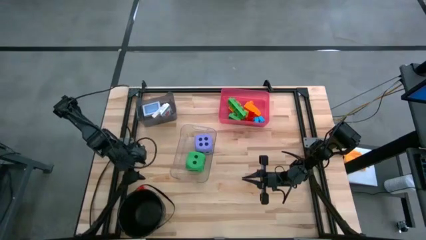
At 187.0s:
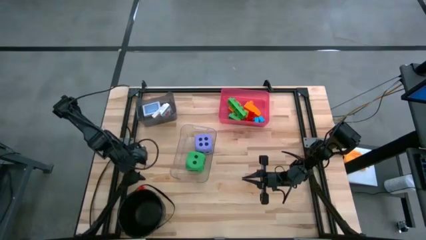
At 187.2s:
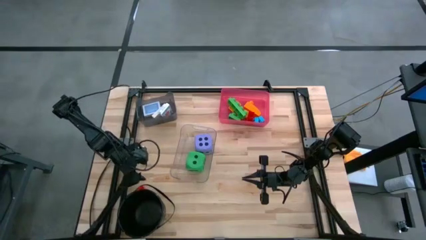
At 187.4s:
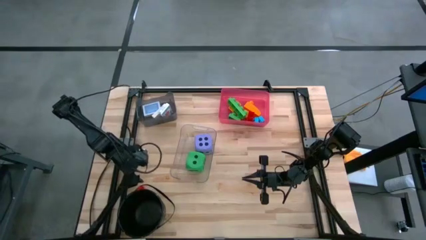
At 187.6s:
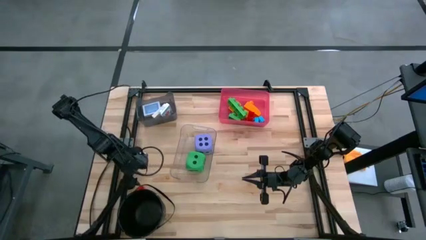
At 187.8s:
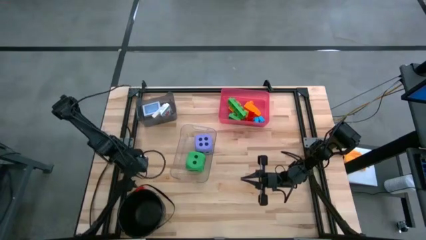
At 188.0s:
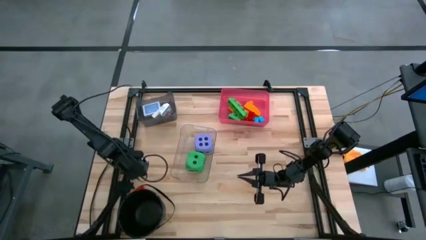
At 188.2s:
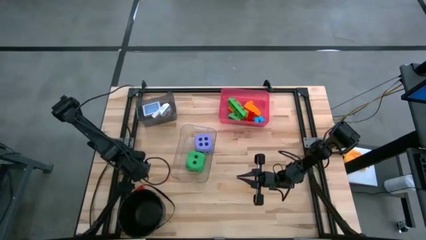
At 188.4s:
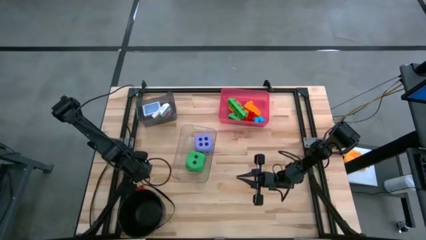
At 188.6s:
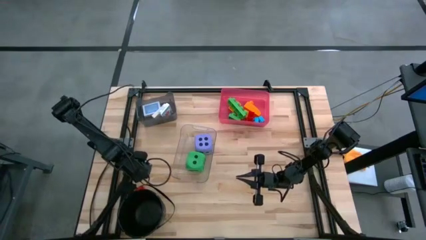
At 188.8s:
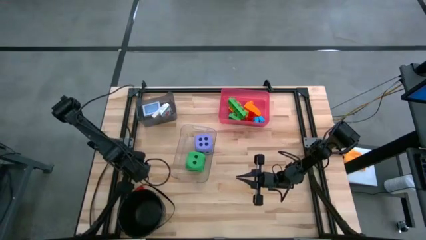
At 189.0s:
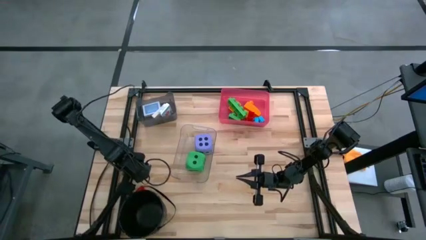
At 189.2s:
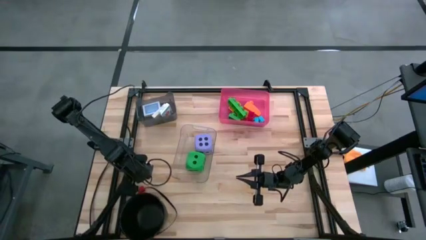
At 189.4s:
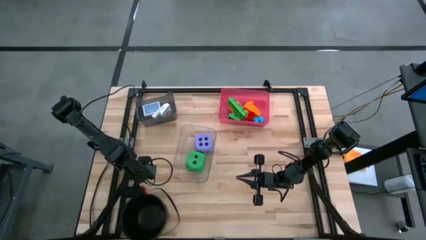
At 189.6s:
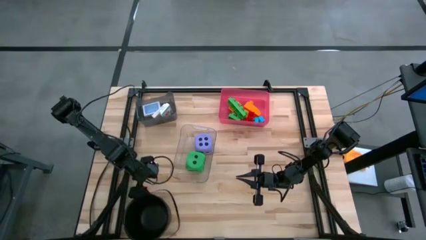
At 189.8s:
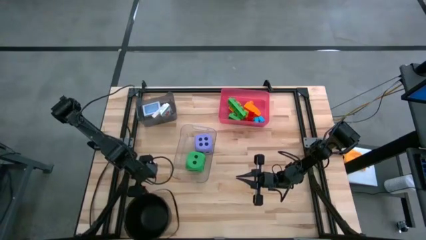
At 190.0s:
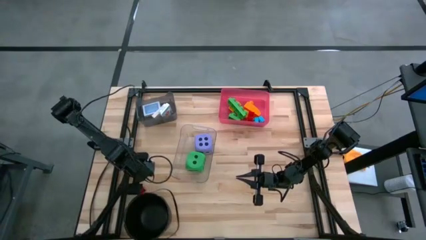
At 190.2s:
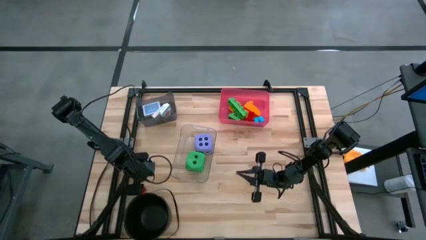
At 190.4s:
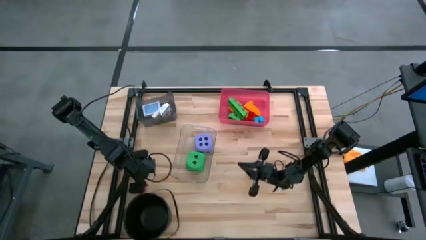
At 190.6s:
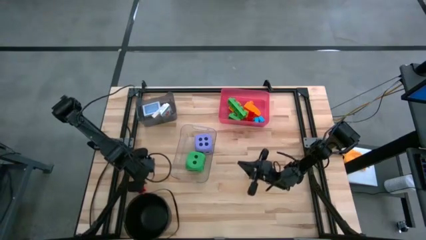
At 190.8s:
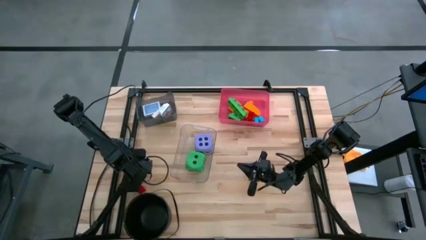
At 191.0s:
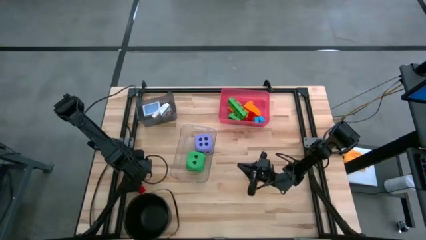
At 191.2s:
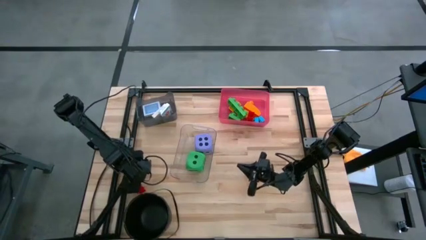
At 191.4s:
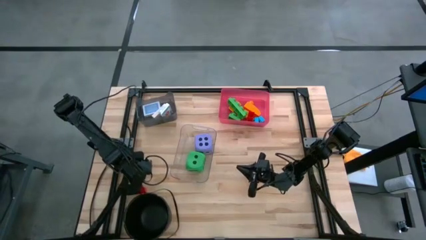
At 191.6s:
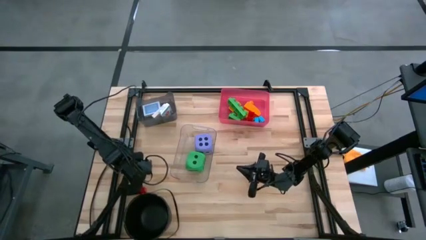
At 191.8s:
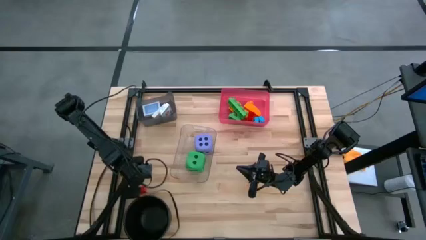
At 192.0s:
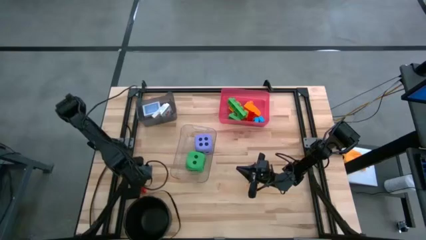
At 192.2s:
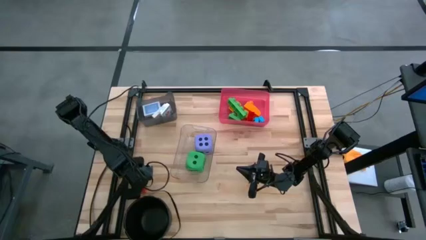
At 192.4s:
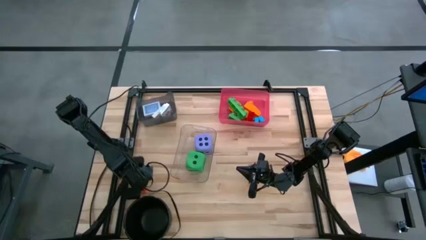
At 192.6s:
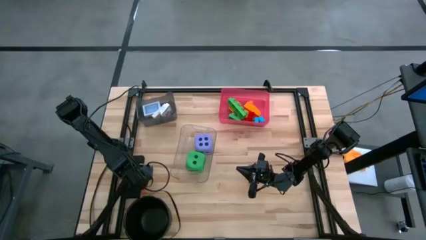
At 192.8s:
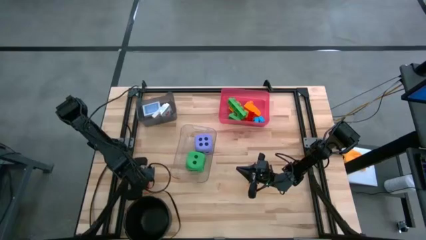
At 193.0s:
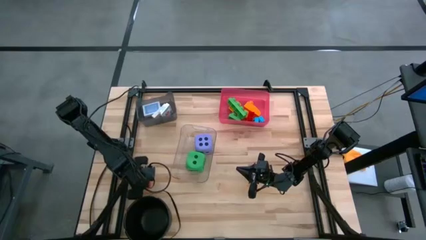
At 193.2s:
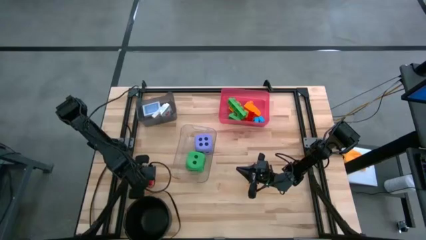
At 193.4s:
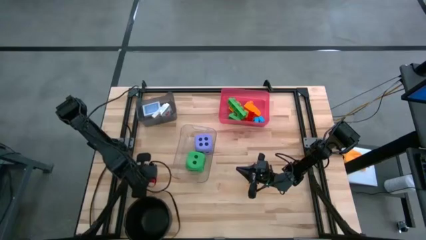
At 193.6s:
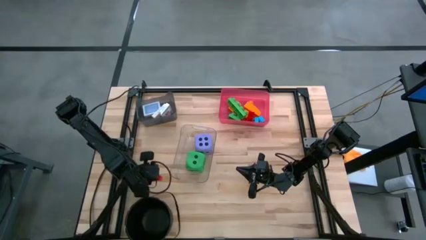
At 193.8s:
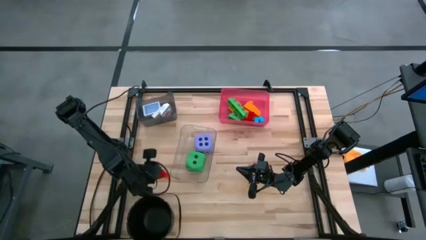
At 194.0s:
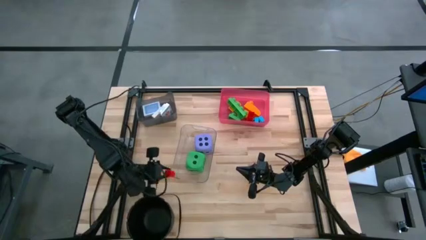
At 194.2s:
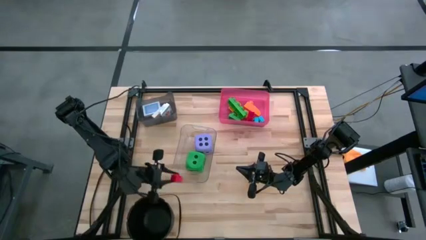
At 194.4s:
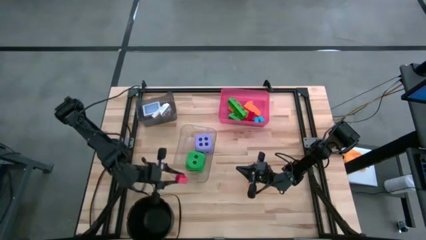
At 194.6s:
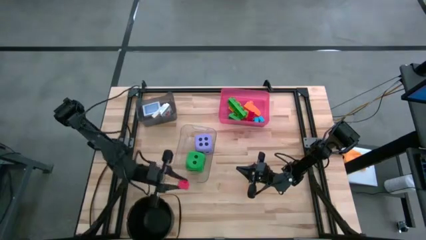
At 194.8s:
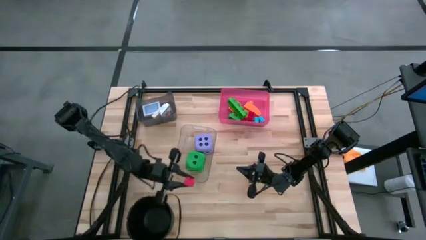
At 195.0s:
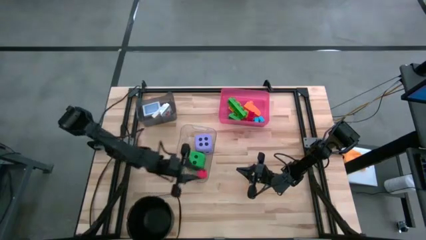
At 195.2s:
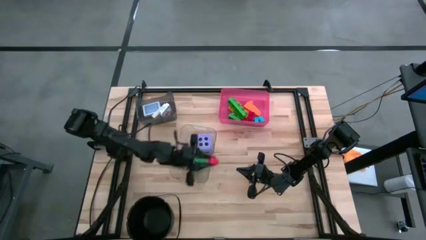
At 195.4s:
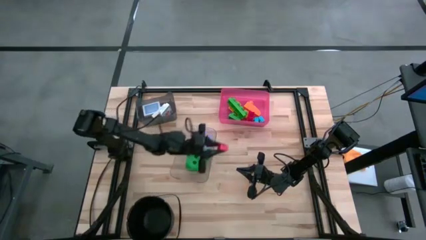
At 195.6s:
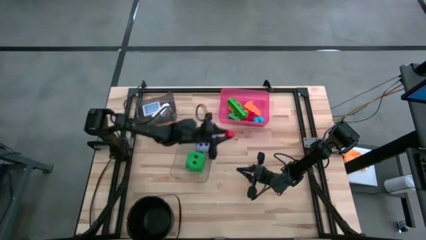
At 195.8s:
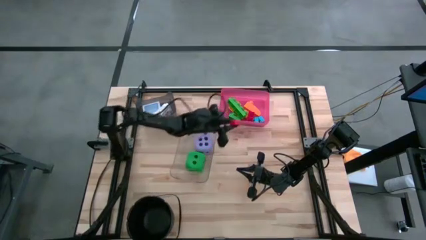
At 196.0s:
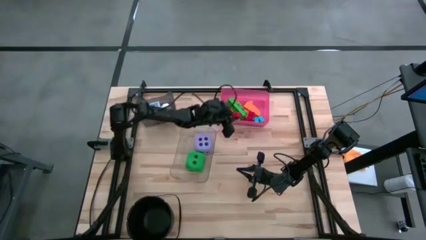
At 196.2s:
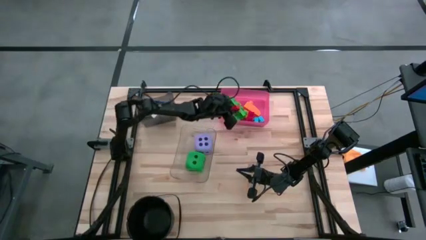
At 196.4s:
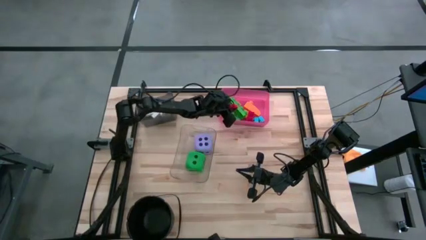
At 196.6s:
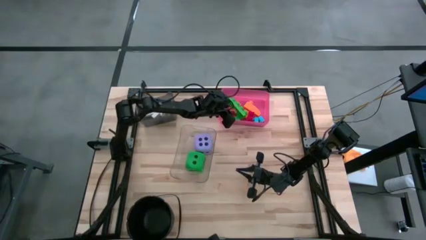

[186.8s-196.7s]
Task: Pick & Place Toys
Put the red game piece into the pink bin

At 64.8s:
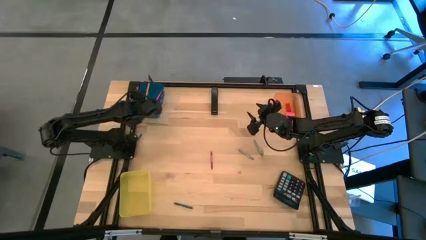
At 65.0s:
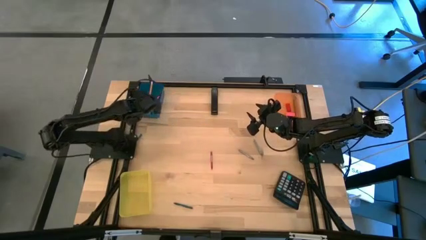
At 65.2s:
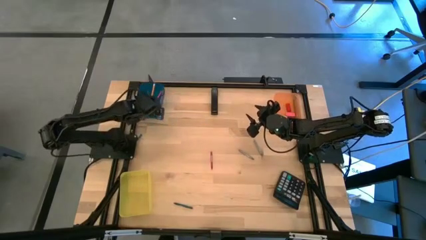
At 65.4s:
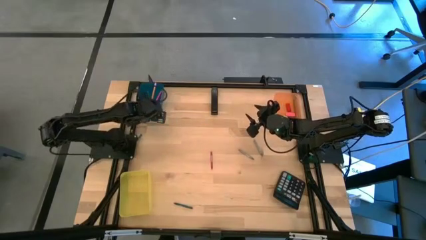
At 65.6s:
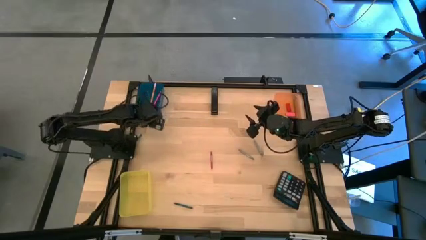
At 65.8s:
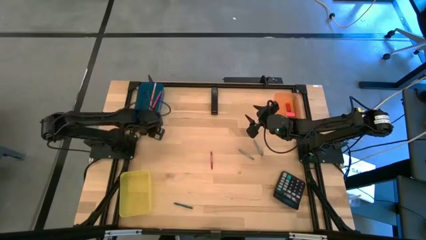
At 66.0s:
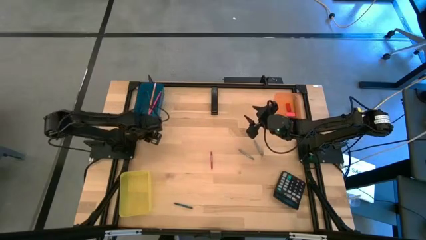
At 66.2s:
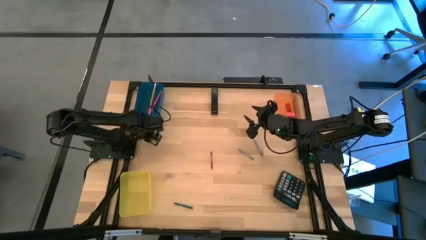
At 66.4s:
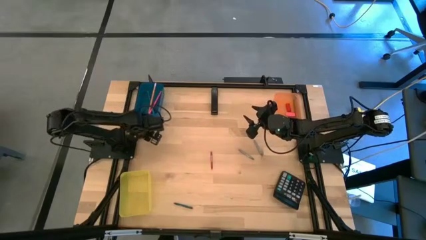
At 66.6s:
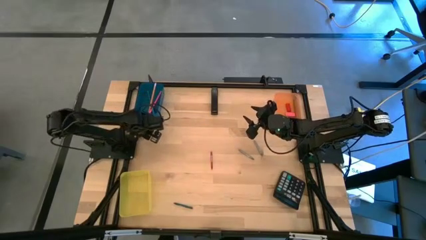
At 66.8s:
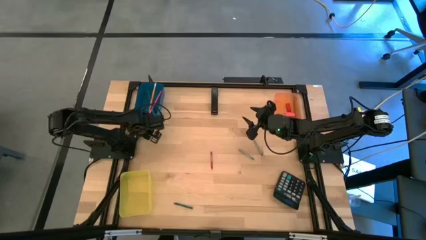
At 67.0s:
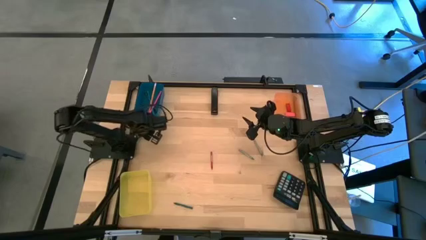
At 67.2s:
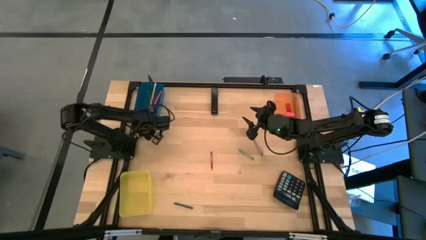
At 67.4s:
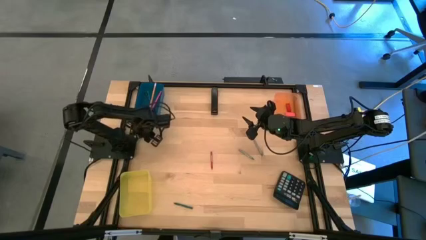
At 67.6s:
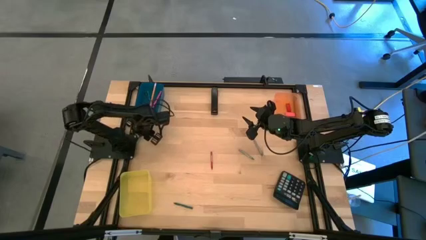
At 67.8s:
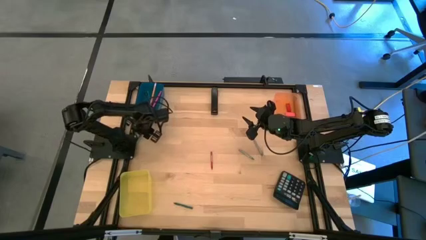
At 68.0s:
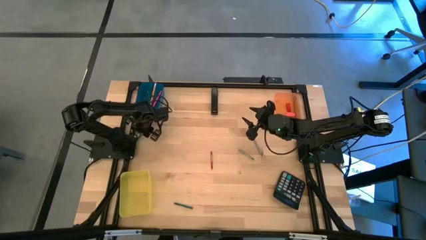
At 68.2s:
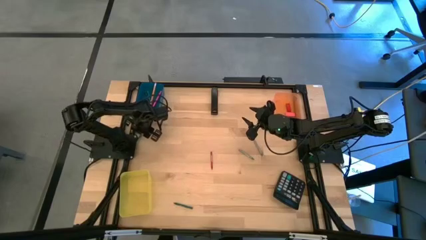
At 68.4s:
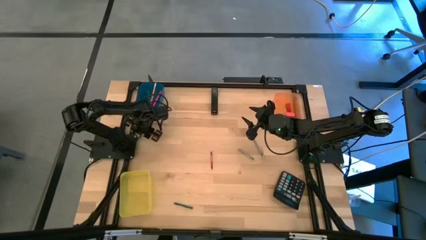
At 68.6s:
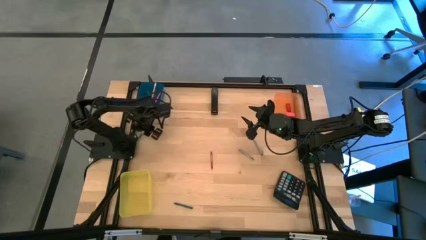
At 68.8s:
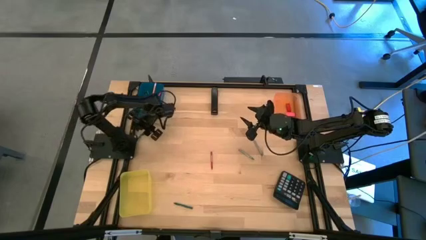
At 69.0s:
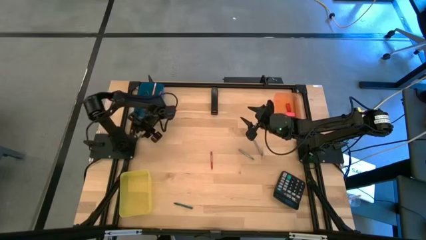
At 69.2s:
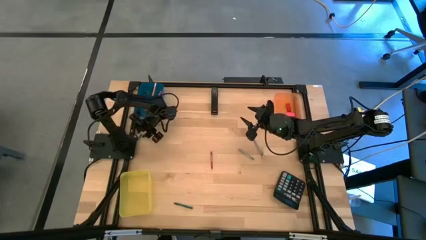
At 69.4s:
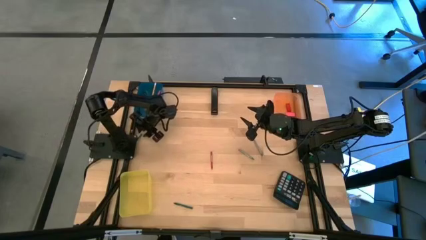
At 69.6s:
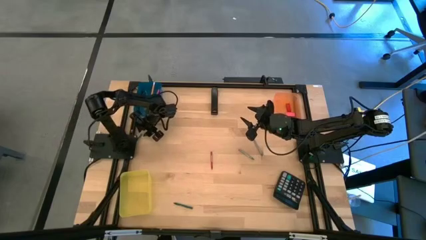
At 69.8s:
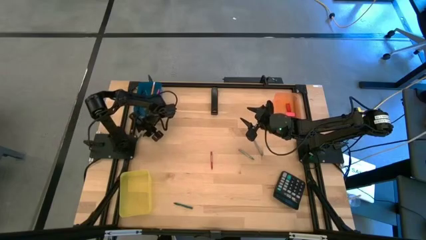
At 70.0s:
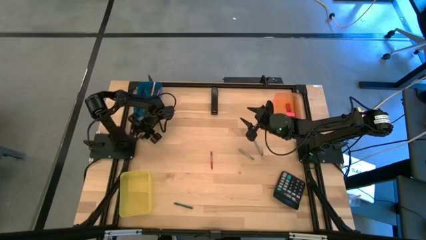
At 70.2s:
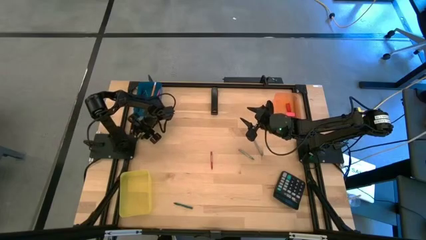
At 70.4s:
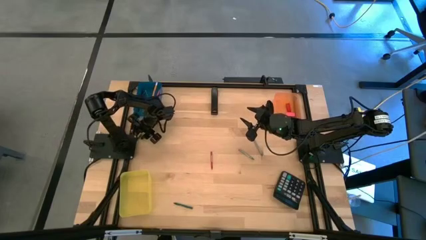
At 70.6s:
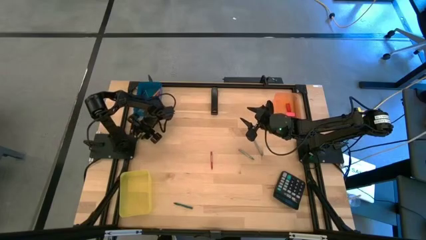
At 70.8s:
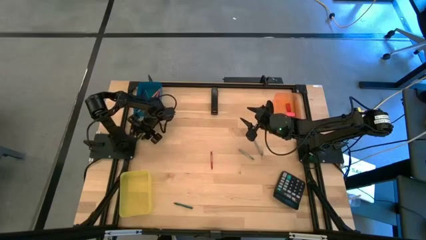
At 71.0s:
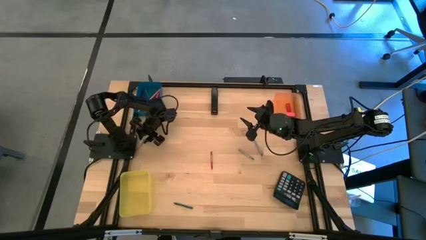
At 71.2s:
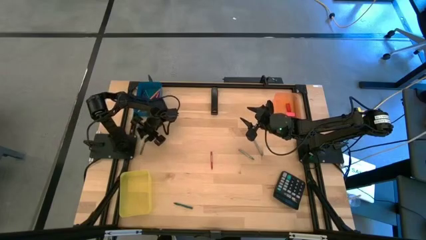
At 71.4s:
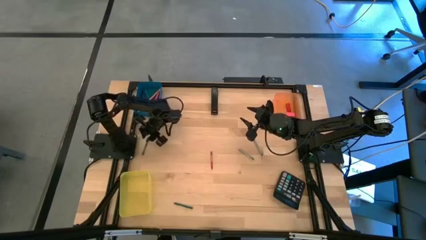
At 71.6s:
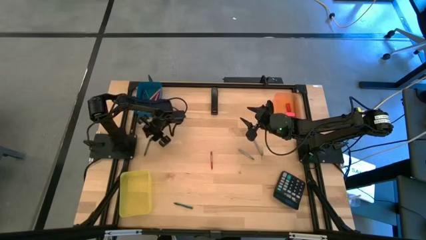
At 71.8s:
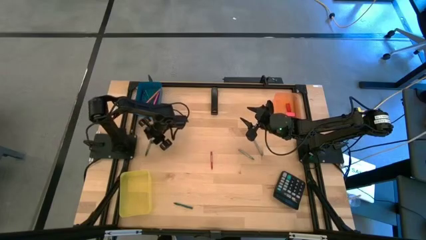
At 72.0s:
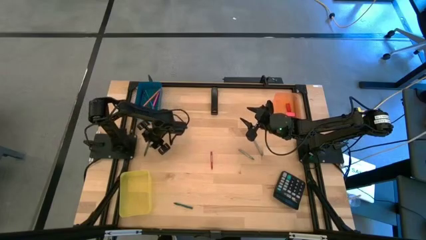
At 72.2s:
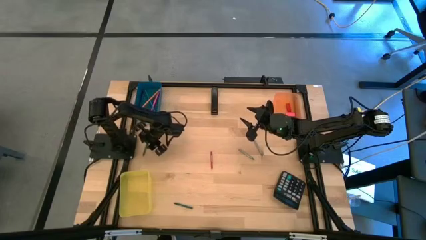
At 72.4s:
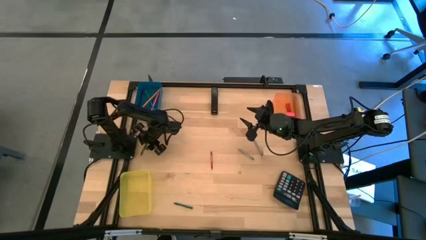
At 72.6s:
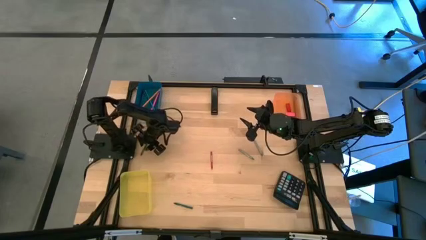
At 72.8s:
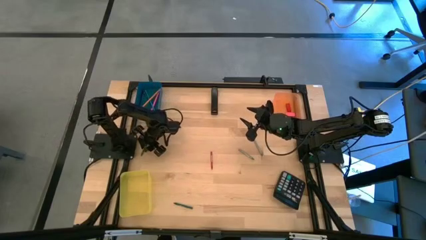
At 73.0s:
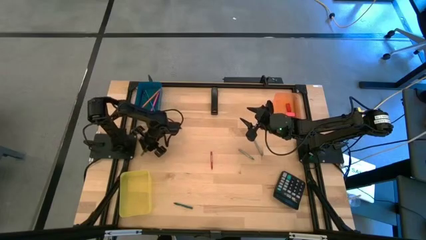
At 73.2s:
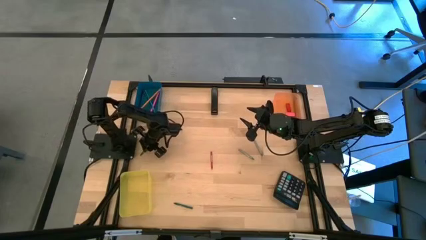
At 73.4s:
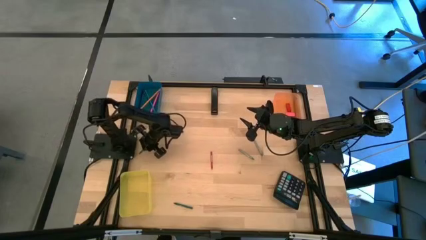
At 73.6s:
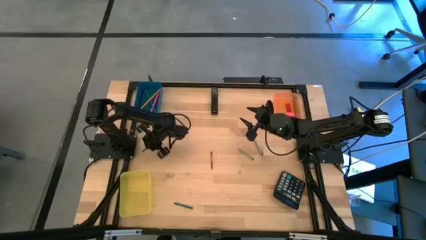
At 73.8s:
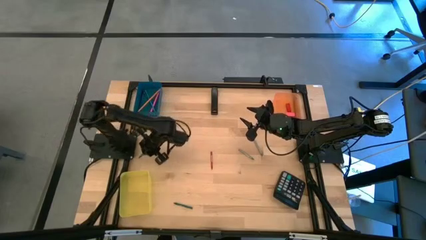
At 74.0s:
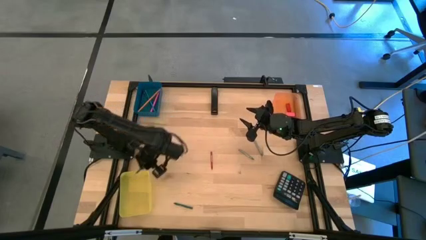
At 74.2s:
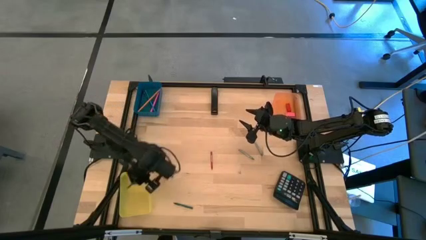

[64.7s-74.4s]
Task: Sort crayons/erasers/pens/pencils in bins
Put the top green crayon into the yellow bin
